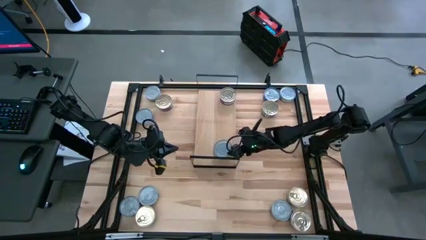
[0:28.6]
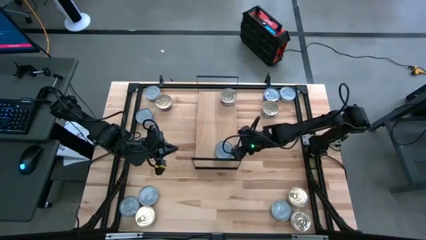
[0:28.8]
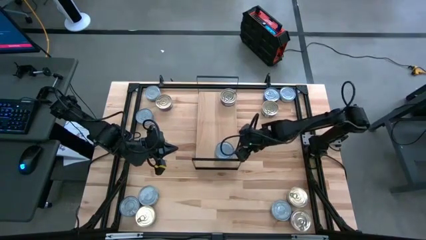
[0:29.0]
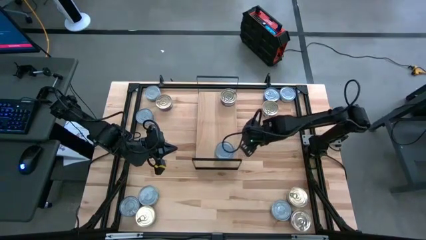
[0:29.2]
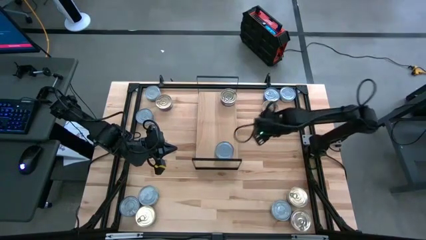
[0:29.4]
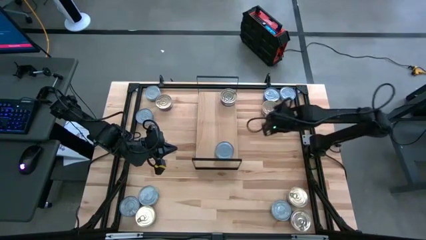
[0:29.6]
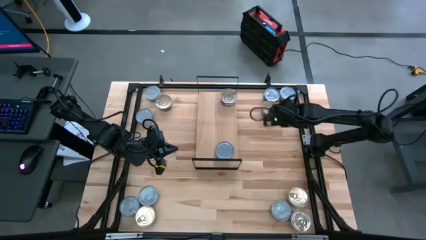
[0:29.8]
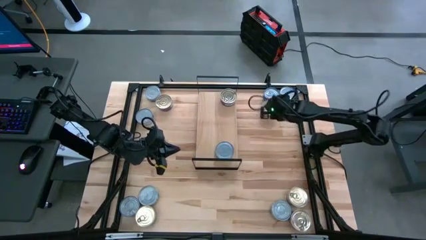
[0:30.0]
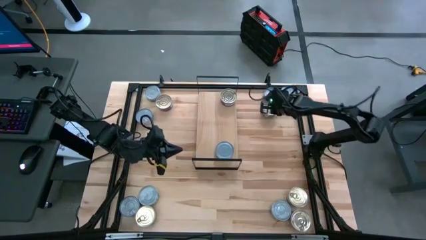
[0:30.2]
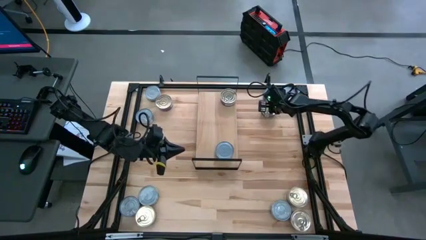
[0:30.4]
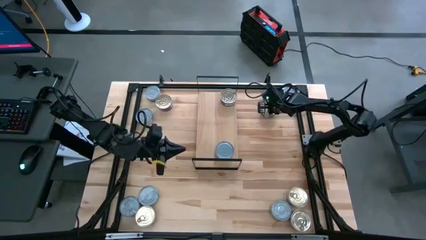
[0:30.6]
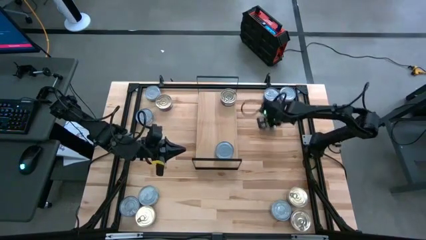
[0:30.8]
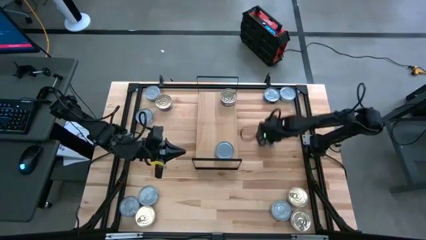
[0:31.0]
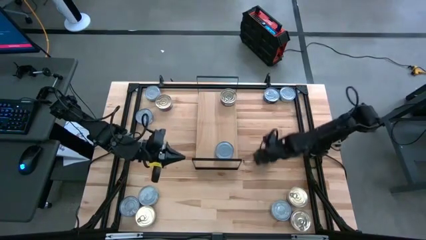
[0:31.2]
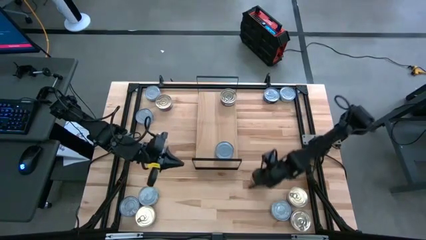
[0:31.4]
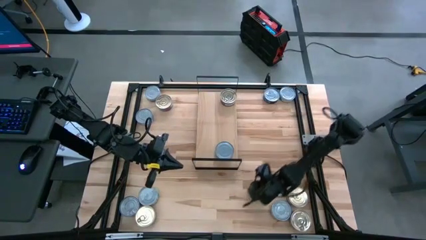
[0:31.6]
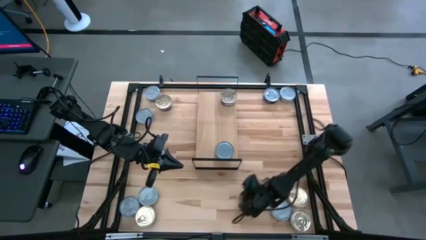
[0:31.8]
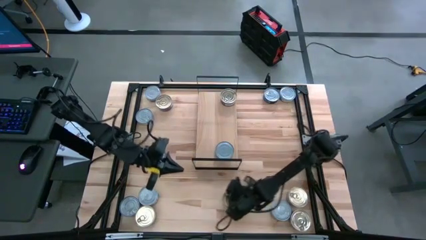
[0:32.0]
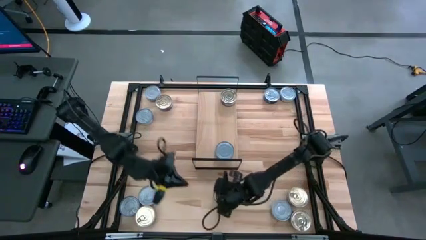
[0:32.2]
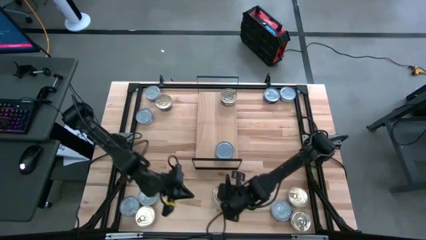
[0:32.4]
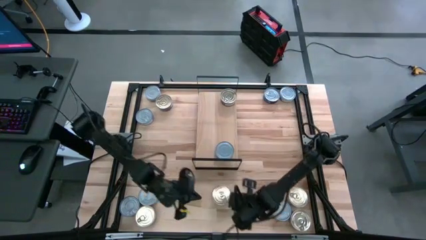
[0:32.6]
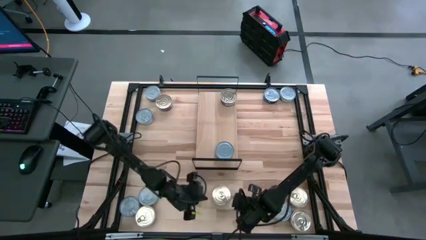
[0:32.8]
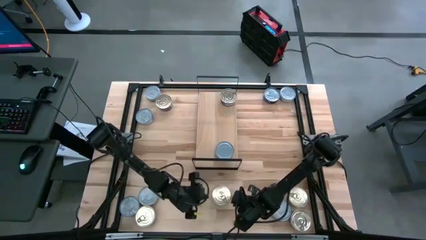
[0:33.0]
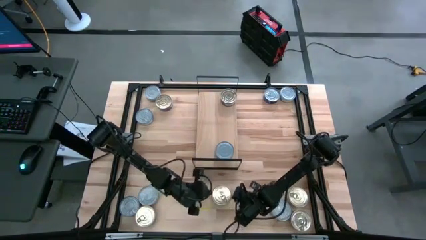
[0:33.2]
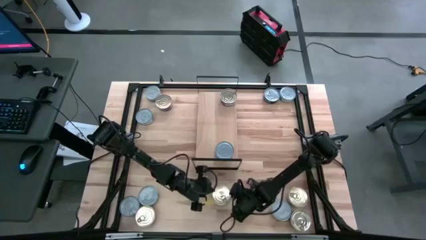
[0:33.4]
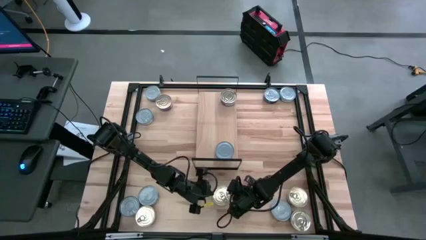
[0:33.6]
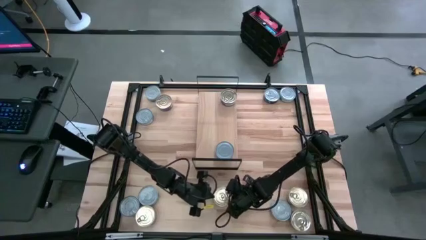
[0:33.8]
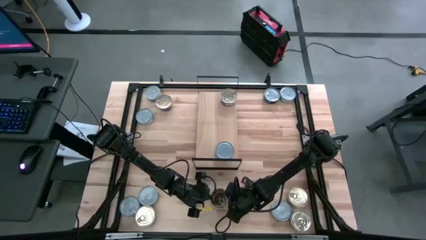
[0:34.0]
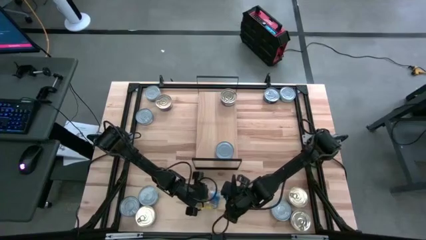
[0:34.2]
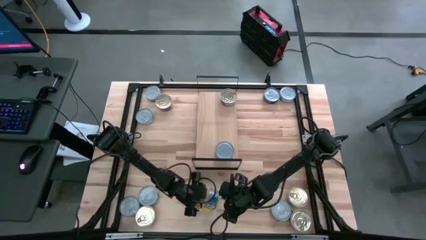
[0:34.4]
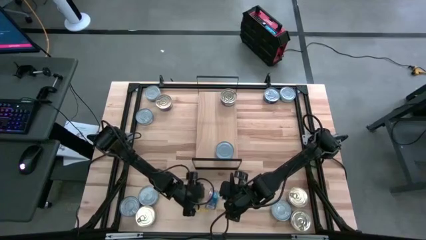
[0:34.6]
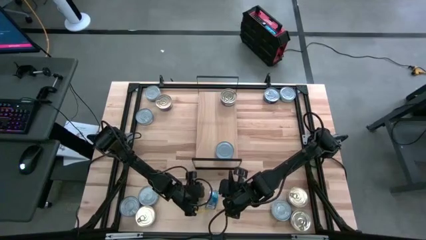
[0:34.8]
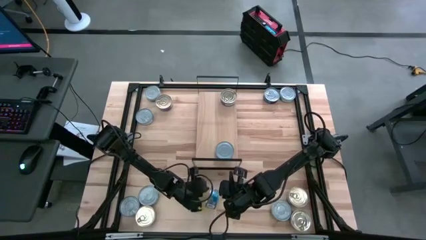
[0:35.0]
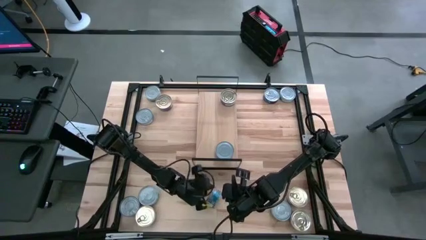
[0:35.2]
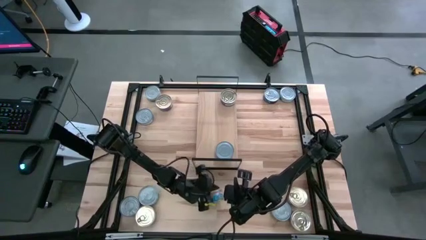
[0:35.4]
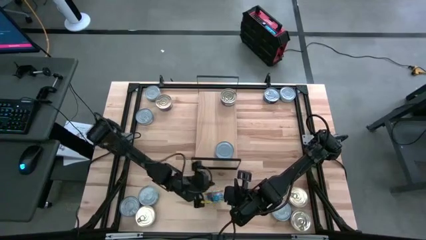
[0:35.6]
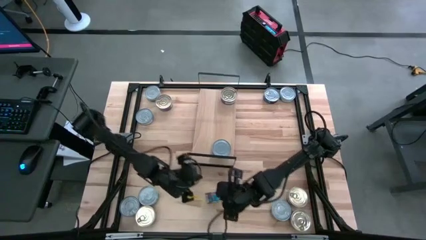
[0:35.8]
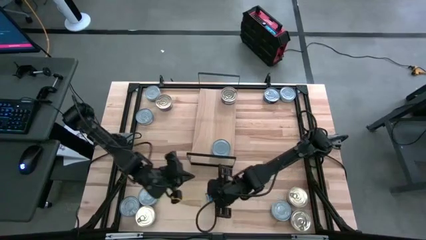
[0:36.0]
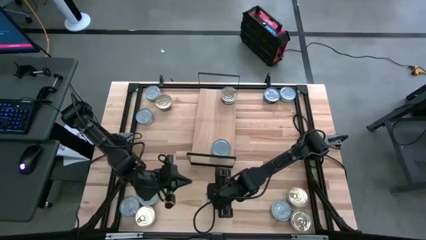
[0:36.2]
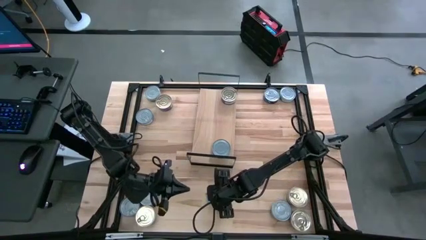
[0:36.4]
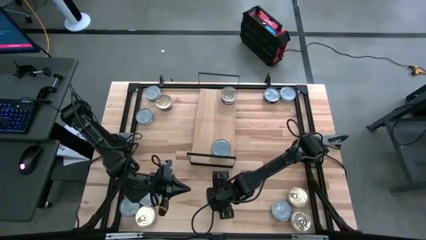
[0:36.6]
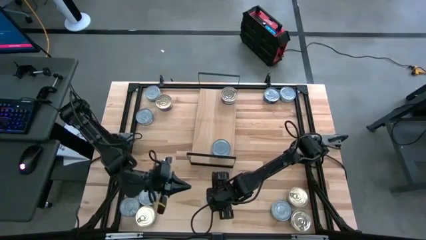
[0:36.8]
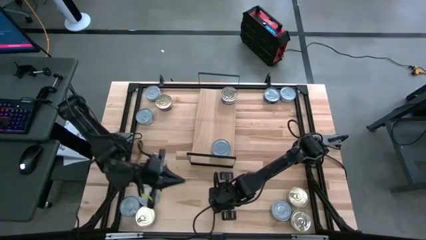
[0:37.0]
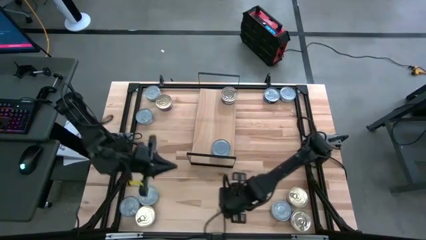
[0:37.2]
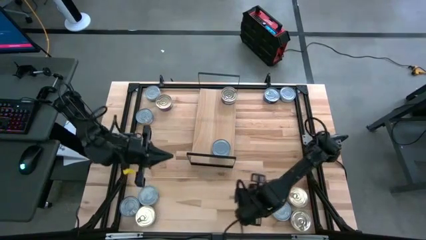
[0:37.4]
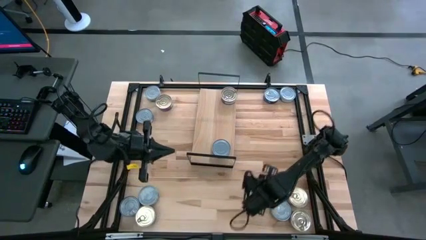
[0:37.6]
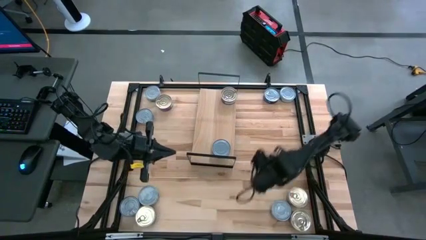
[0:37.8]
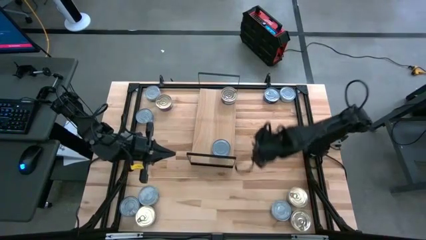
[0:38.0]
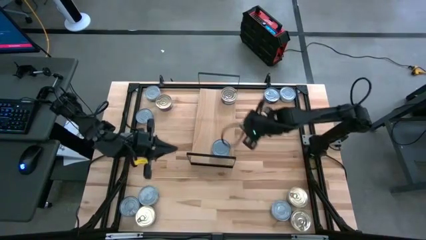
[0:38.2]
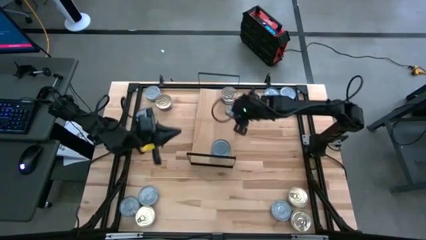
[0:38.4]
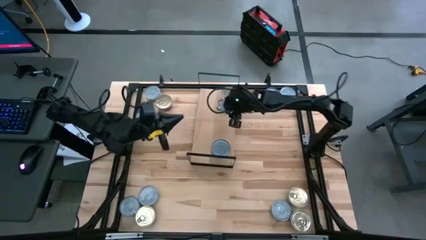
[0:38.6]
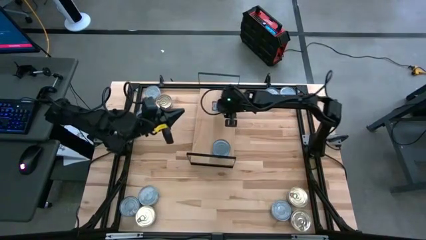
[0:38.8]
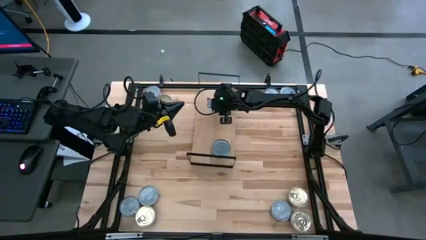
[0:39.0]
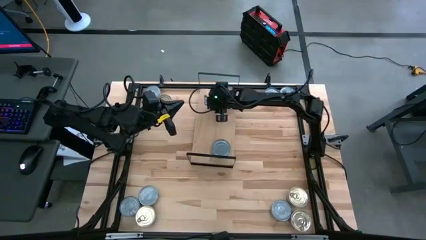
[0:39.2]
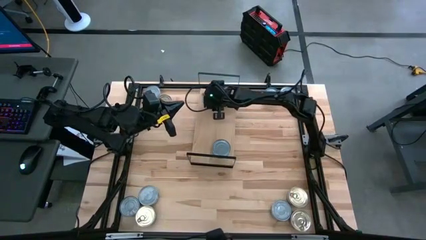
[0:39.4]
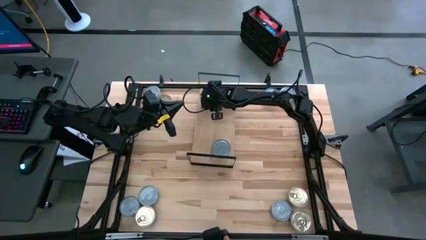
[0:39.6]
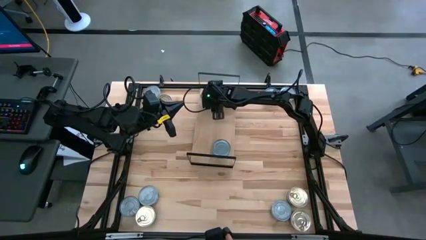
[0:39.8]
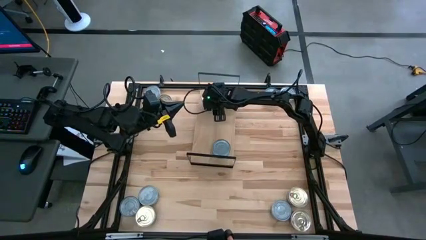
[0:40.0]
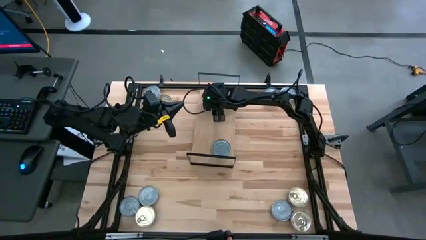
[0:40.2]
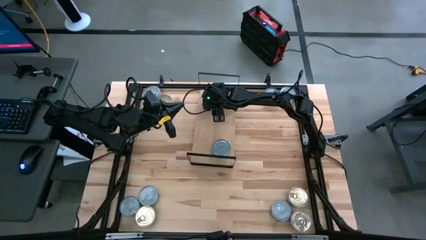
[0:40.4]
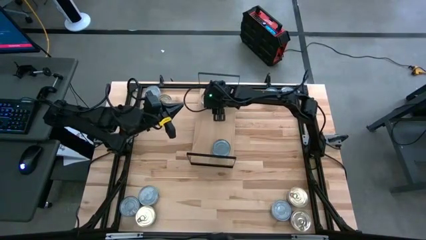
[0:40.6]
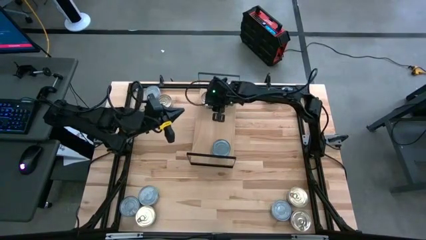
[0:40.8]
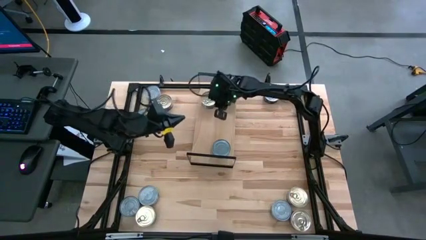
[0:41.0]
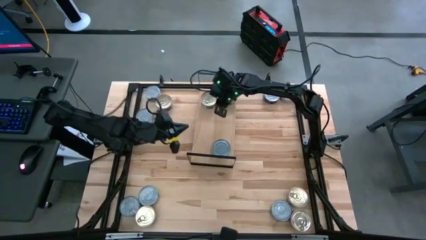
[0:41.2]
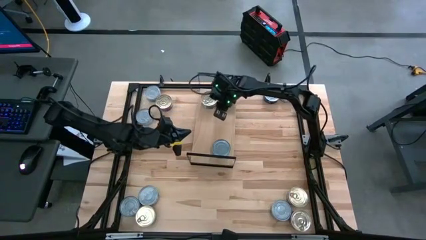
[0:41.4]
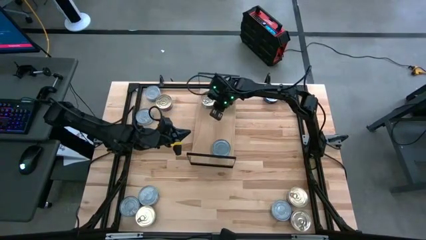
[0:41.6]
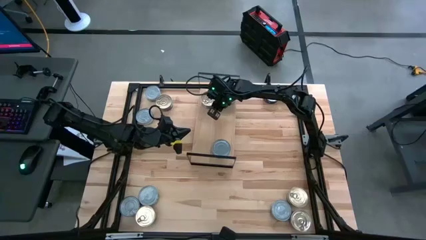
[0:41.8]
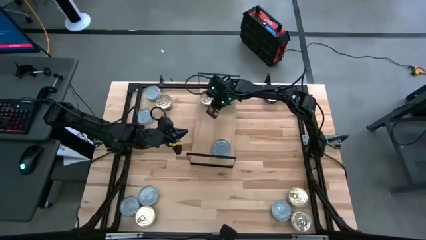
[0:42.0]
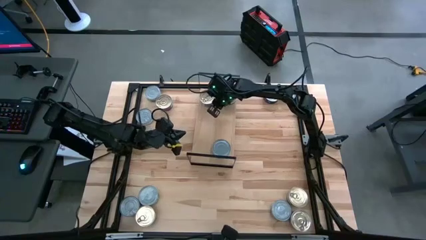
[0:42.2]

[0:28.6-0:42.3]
Task: Stack canned seafood by type on shelf
Put the blue pink tuna can on the shelf aligned with the other blue pink tuna can

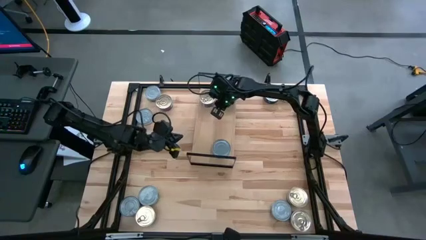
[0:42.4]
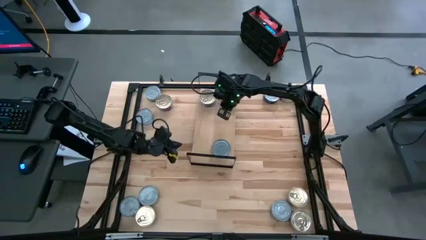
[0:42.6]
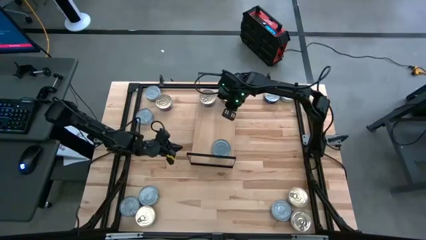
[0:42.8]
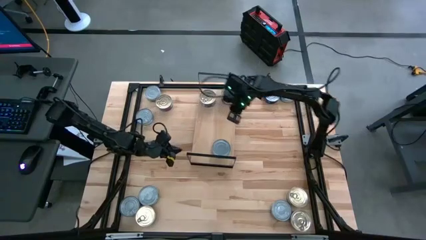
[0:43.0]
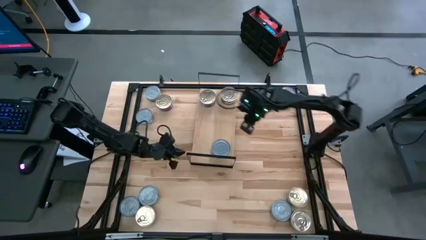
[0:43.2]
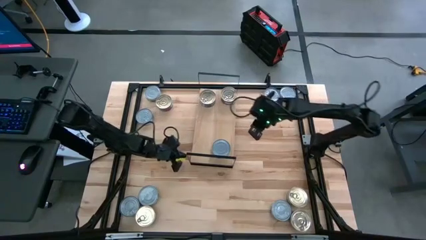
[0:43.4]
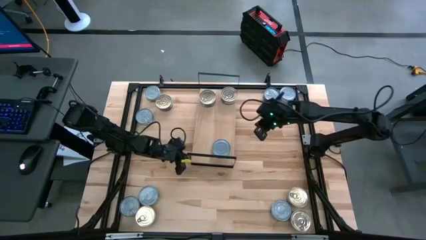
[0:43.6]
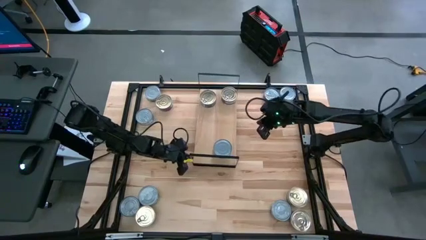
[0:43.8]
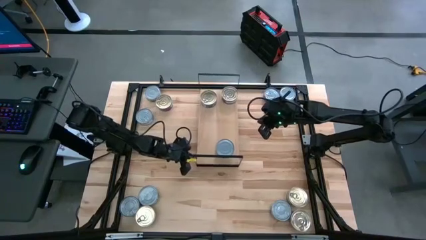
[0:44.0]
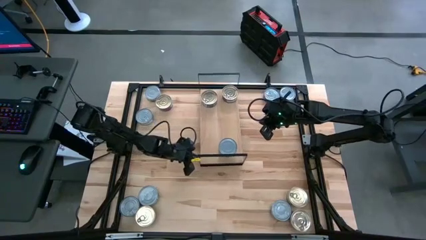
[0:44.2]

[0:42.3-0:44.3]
Adjust the shelf
